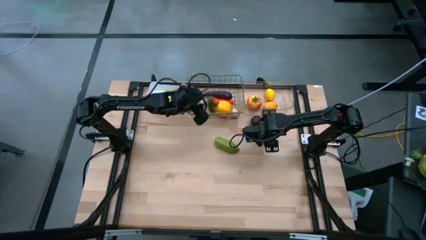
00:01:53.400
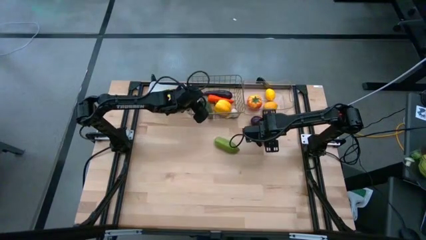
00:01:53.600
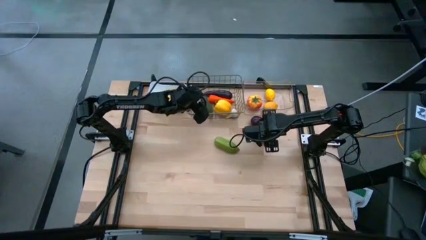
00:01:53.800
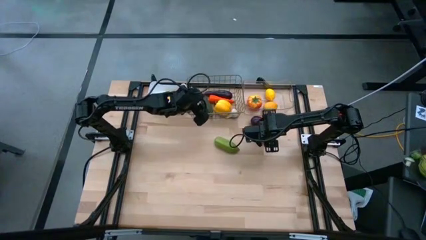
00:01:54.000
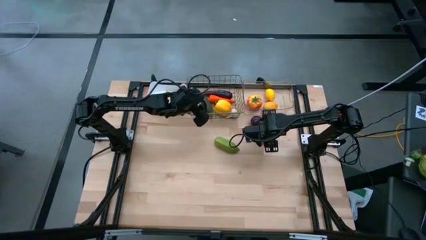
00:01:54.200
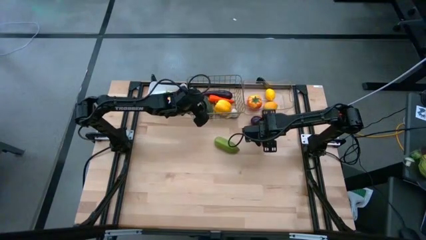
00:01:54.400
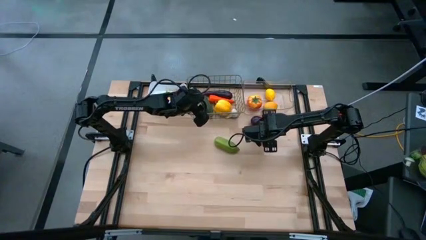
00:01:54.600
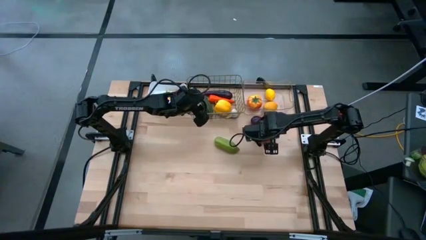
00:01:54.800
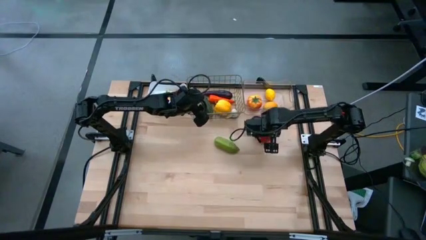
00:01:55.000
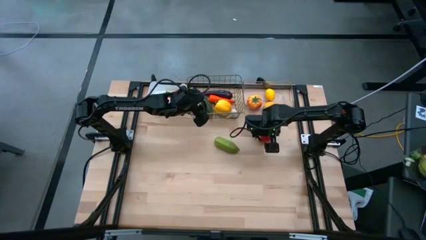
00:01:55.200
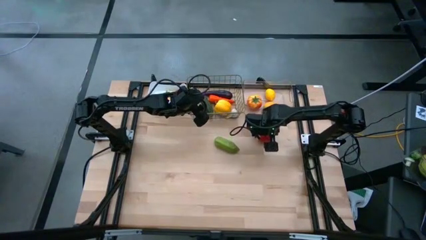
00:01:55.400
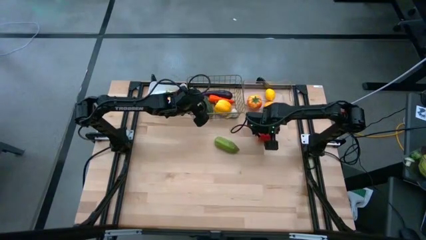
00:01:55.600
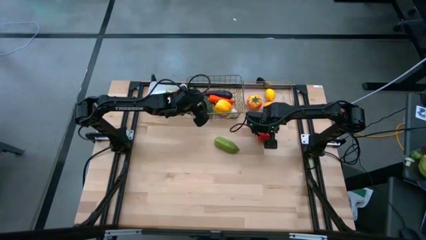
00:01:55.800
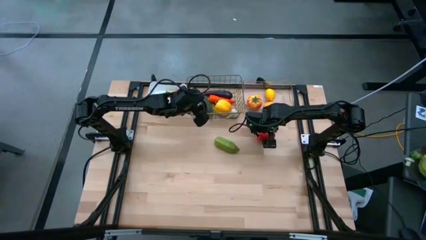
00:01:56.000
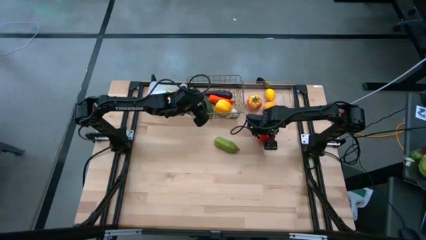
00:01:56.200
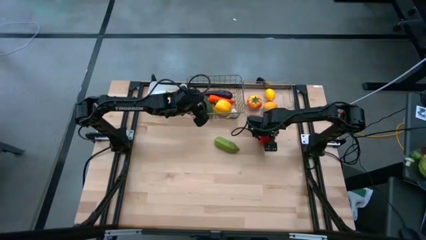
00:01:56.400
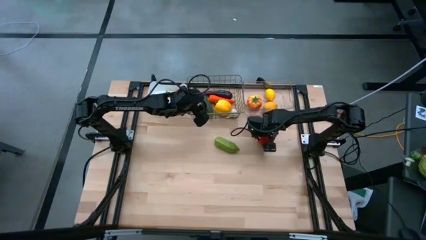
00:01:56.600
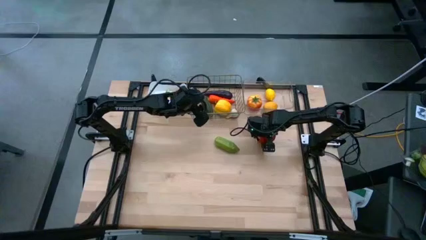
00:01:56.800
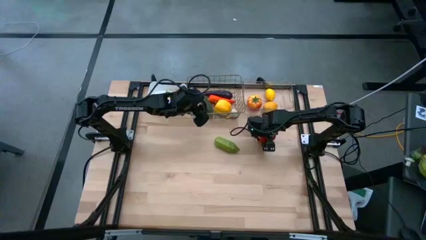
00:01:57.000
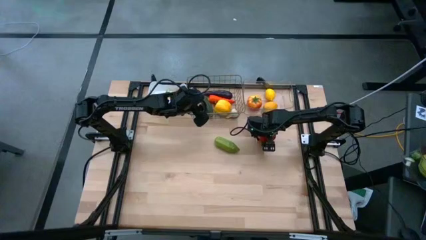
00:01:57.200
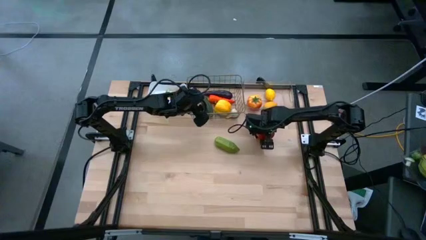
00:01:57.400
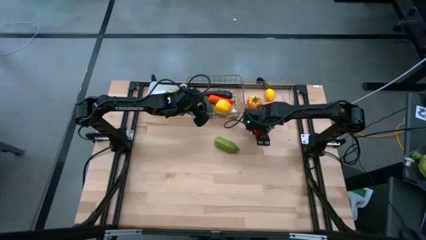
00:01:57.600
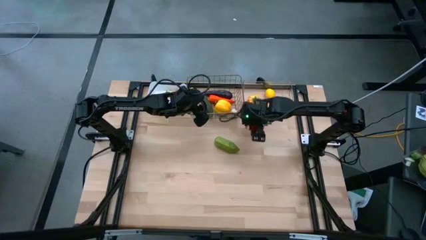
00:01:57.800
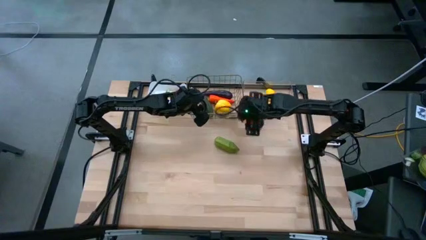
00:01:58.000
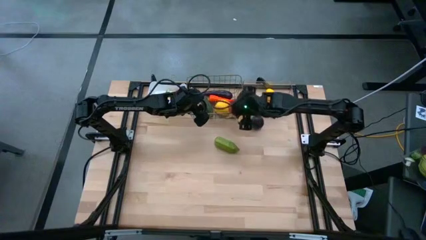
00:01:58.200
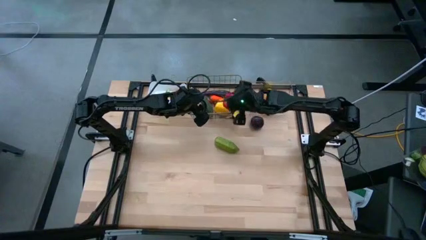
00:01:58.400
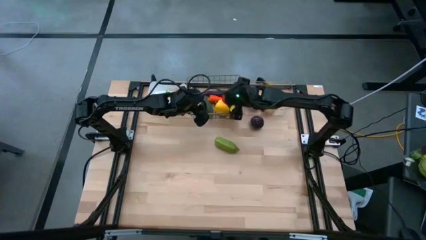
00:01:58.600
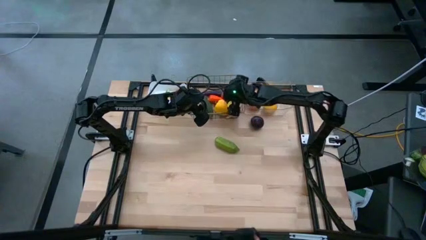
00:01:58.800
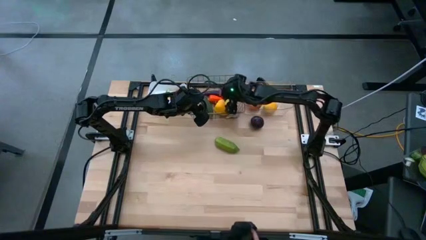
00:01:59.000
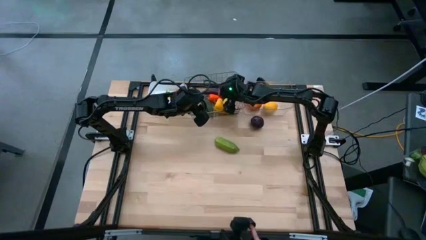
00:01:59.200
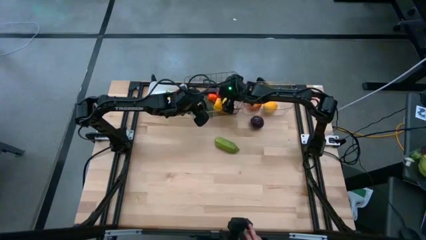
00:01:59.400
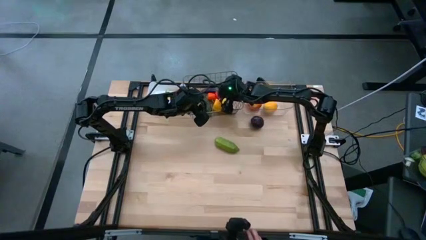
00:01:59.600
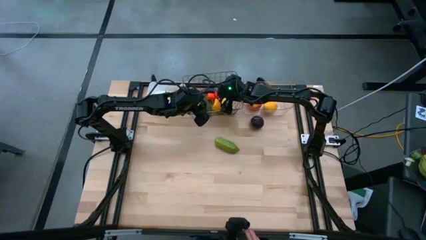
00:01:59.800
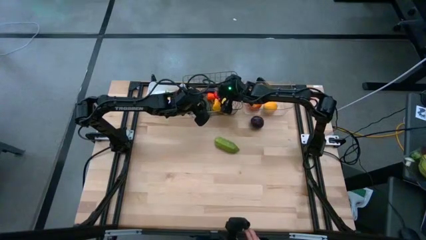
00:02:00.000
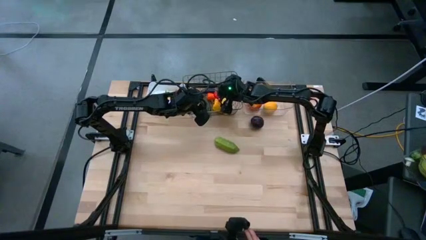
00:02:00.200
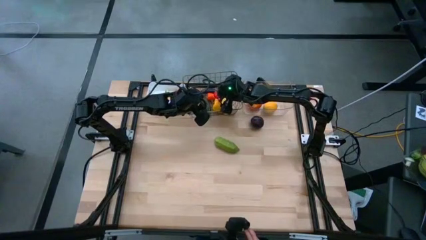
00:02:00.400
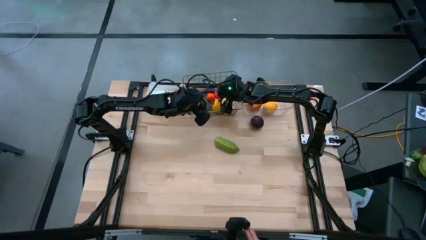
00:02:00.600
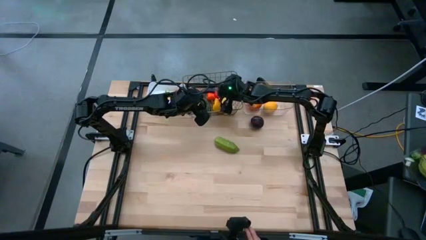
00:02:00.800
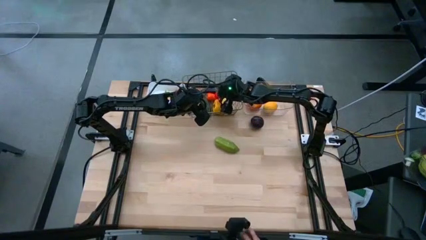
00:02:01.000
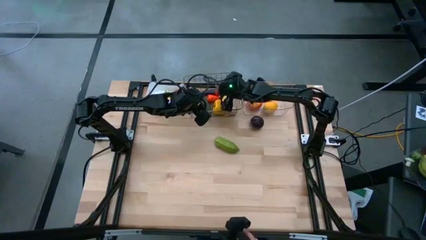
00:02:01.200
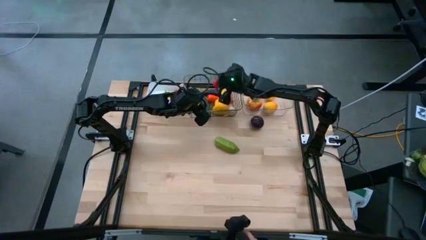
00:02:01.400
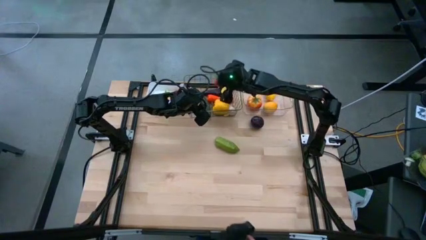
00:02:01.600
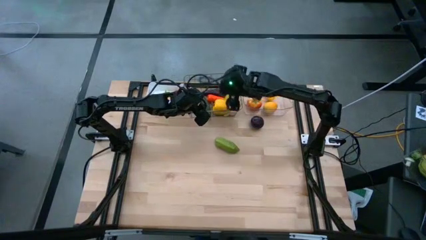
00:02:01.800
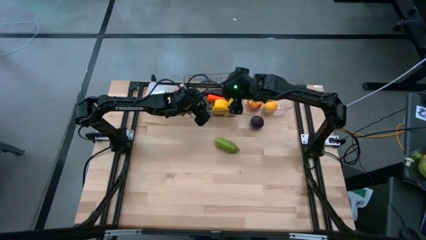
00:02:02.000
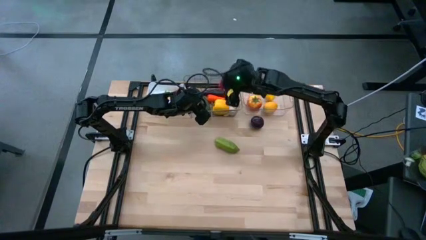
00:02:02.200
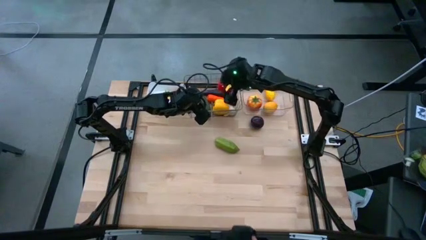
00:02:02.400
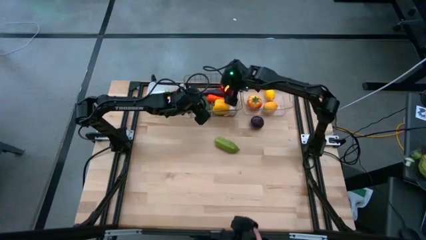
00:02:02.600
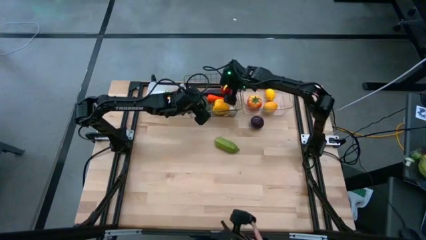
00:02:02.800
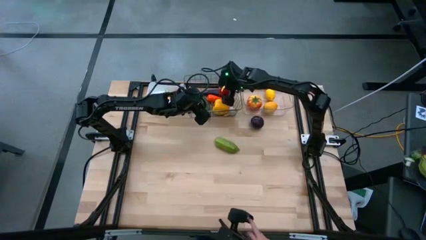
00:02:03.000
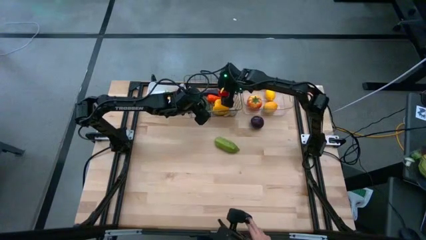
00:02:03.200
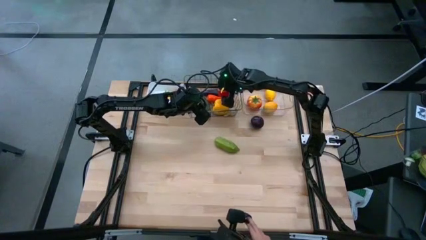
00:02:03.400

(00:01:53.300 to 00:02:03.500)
Task: Sort produce into baskets
Put the red bell pepper into the wire basket

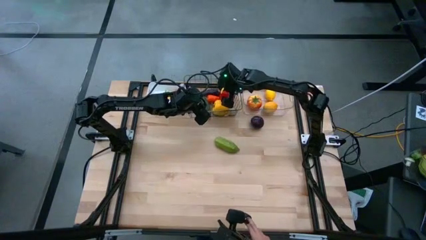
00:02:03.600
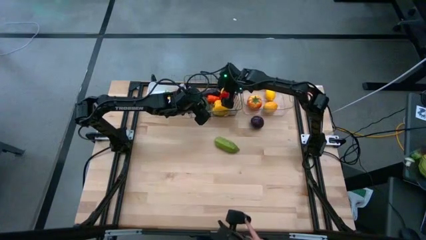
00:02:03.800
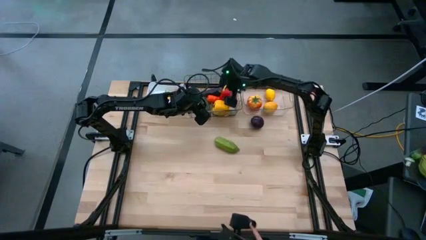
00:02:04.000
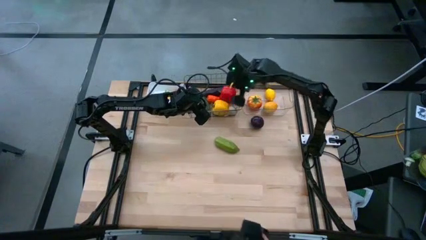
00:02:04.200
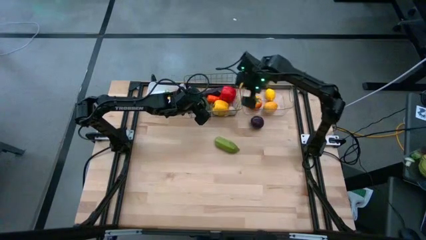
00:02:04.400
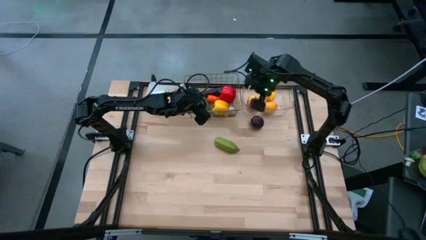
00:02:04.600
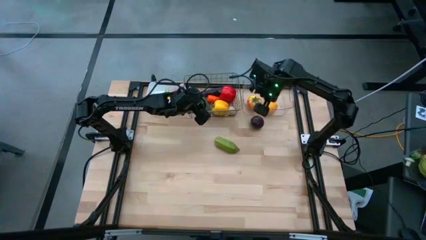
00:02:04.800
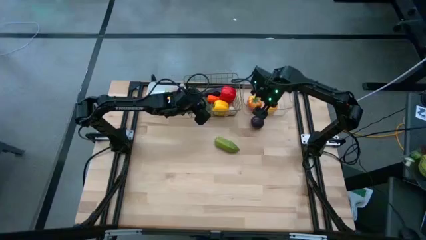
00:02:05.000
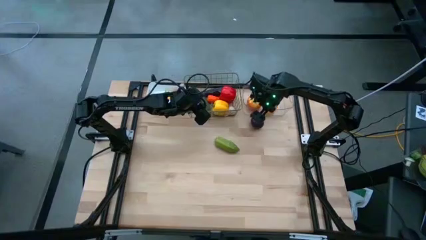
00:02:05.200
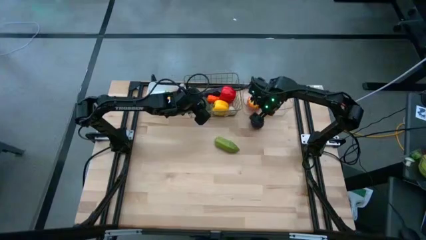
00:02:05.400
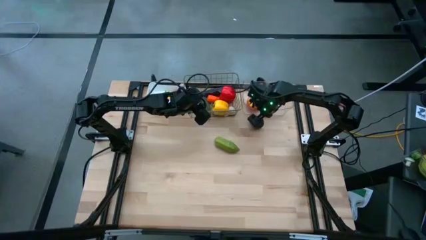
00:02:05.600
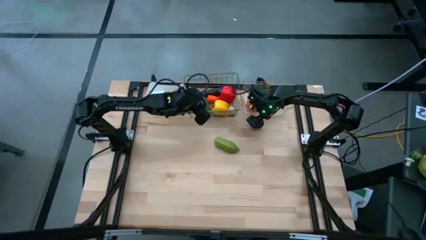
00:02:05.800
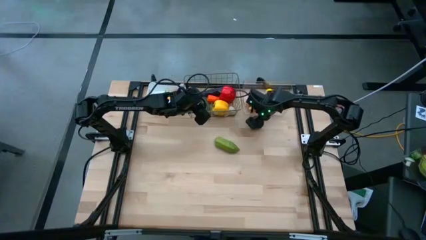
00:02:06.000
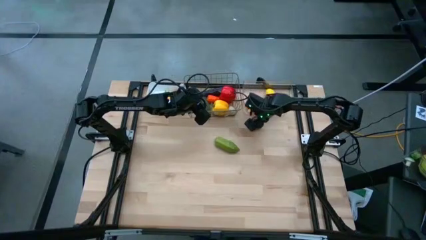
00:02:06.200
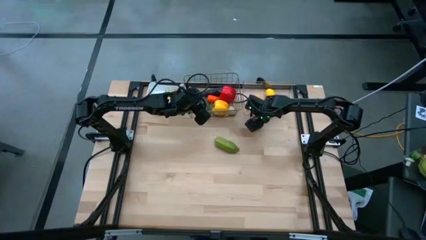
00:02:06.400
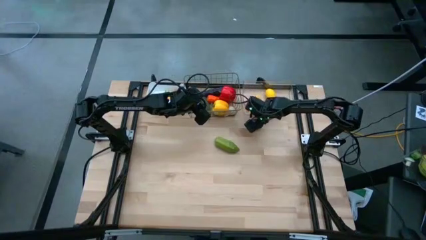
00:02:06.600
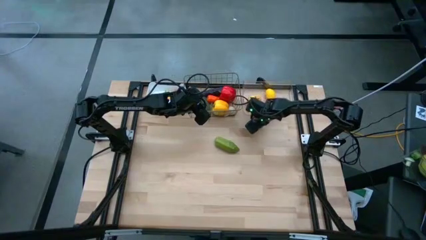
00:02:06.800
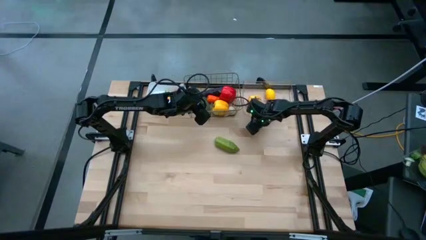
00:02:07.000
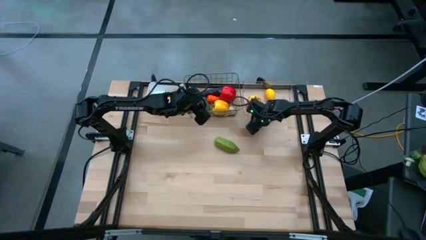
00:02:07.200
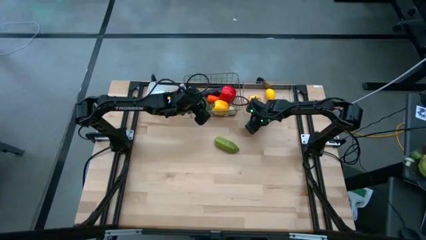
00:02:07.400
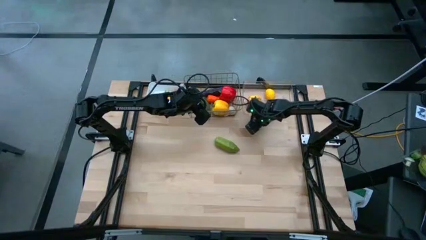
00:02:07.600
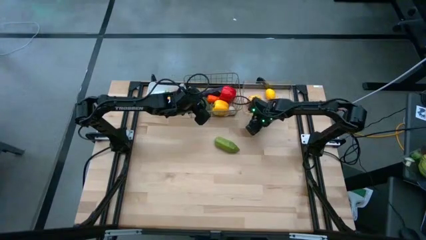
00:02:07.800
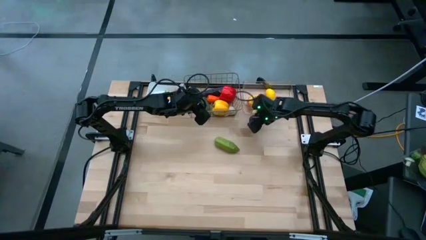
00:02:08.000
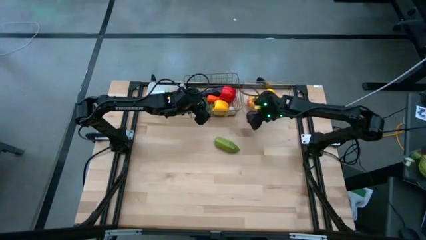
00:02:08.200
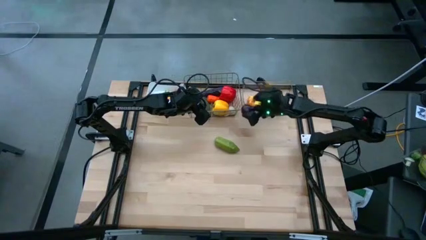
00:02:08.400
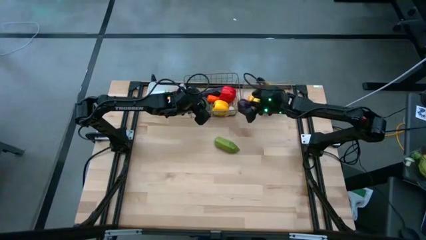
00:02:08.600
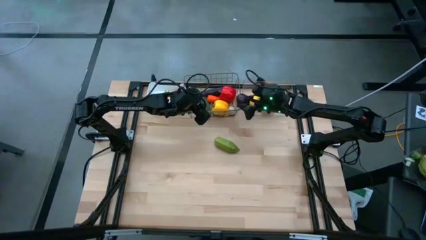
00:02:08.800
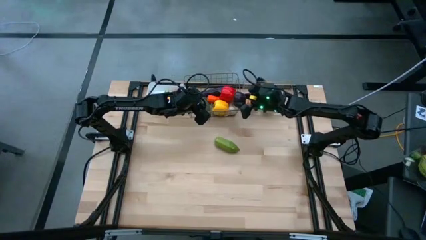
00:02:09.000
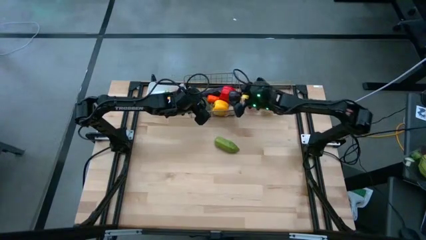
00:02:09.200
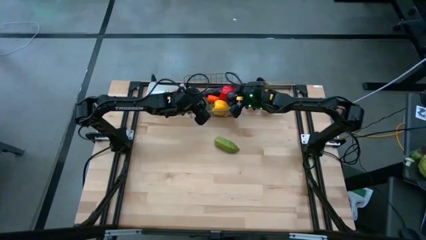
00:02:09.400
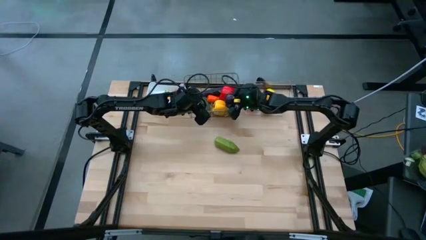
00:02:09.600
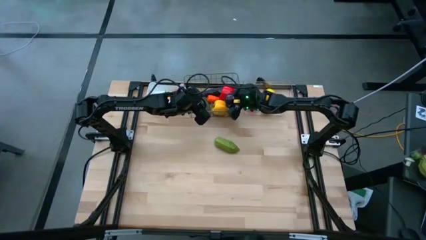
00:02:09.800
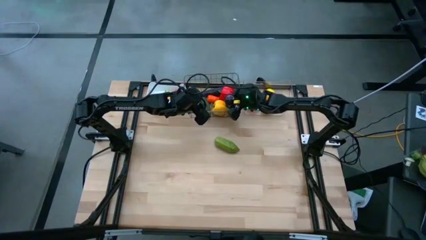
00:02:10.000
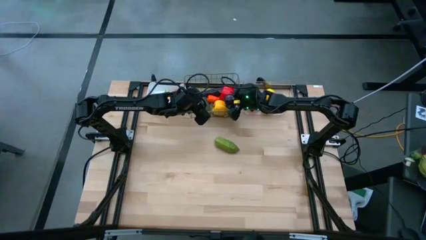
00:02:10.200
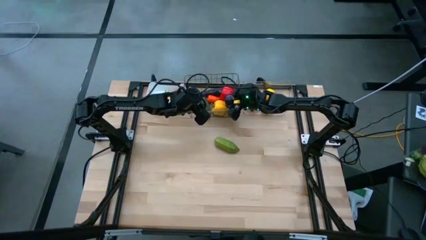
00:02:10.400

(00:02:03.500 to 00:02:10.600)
Put the plum into the wire basket
